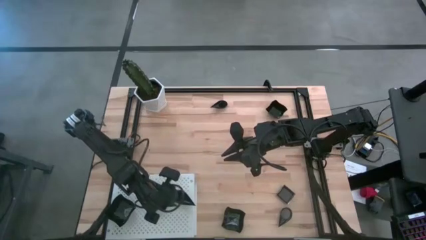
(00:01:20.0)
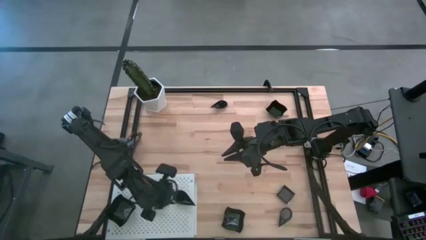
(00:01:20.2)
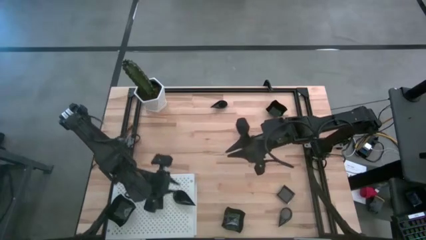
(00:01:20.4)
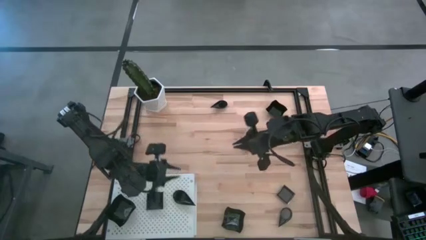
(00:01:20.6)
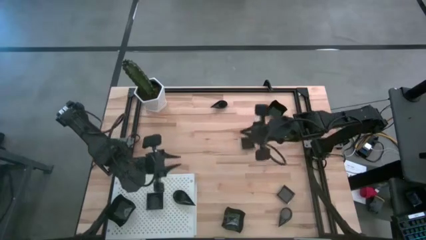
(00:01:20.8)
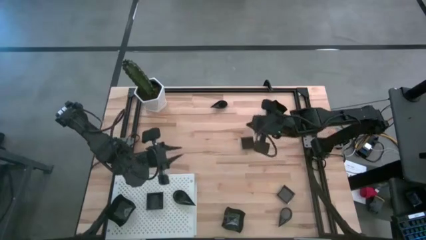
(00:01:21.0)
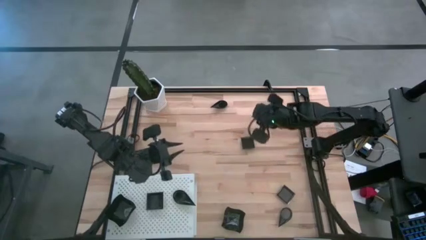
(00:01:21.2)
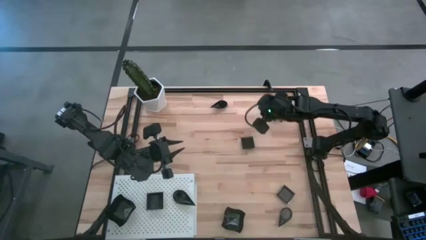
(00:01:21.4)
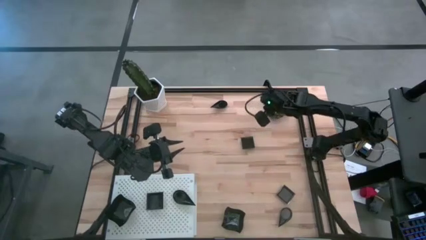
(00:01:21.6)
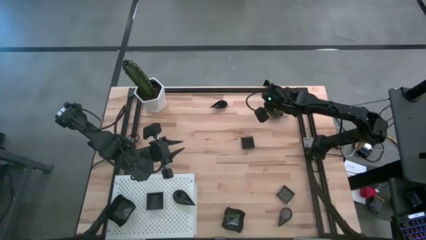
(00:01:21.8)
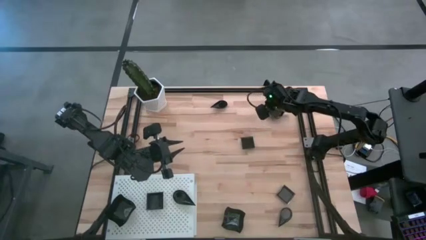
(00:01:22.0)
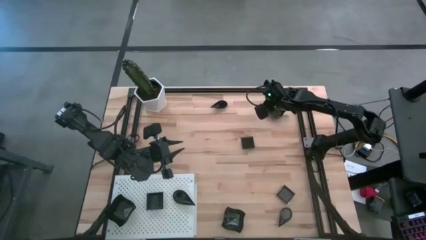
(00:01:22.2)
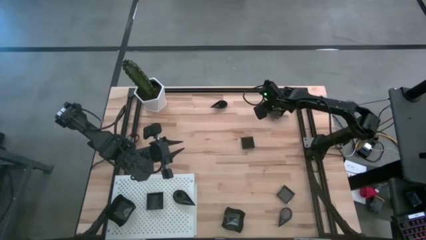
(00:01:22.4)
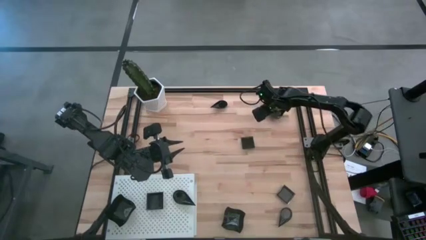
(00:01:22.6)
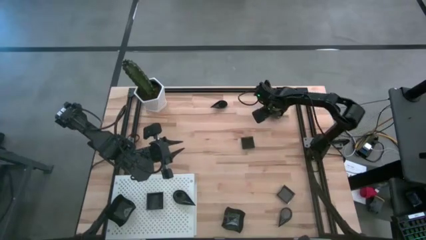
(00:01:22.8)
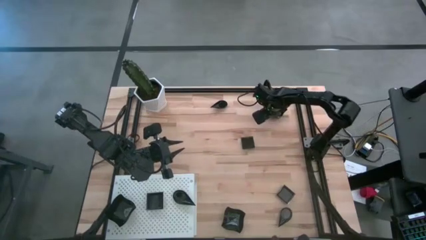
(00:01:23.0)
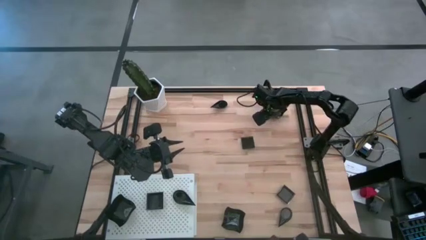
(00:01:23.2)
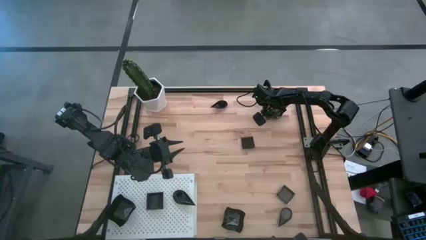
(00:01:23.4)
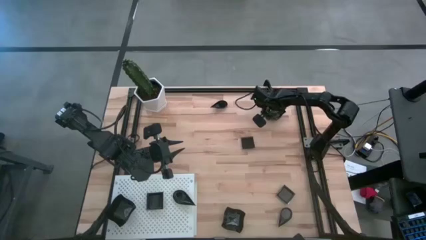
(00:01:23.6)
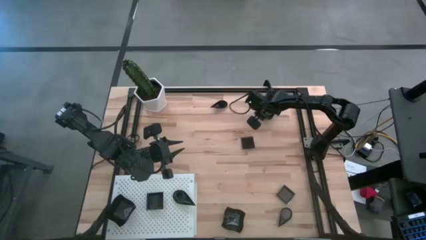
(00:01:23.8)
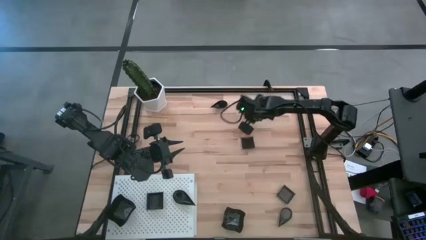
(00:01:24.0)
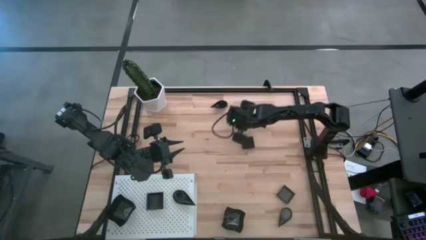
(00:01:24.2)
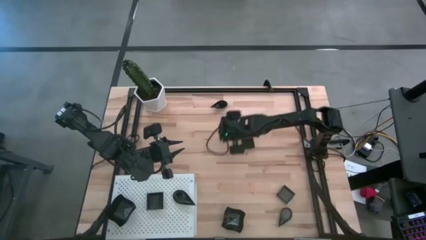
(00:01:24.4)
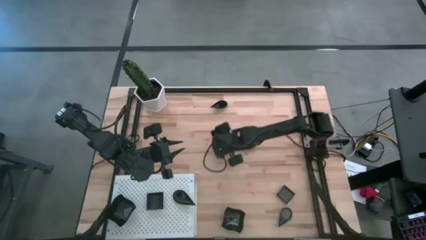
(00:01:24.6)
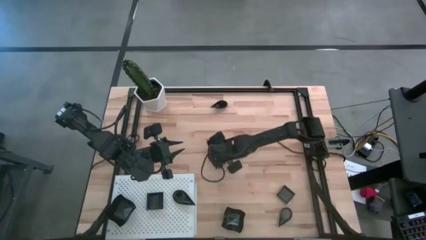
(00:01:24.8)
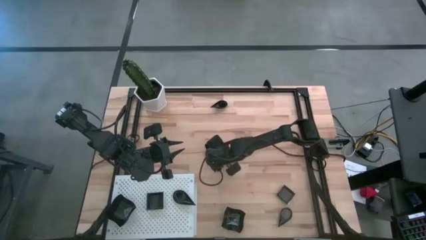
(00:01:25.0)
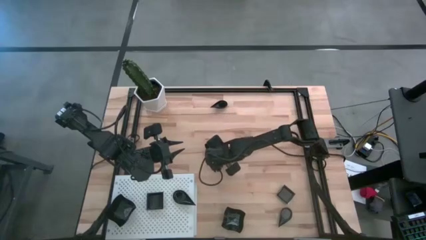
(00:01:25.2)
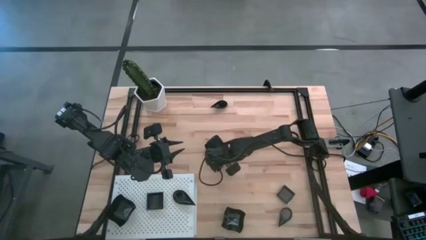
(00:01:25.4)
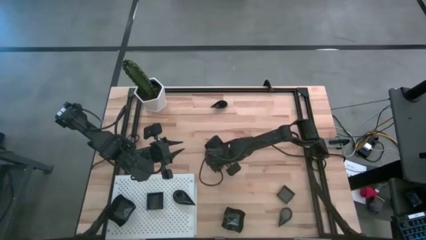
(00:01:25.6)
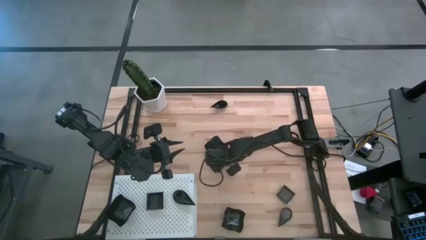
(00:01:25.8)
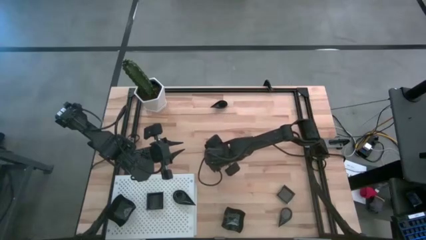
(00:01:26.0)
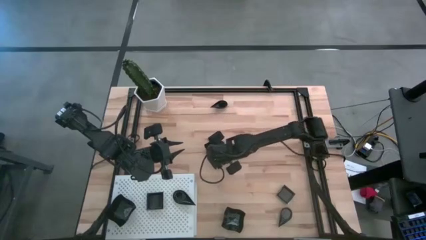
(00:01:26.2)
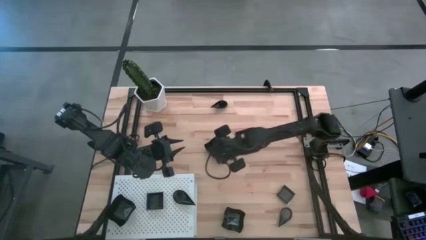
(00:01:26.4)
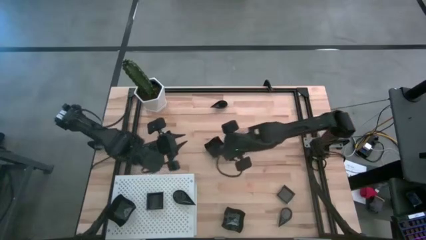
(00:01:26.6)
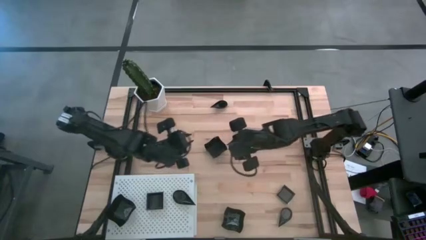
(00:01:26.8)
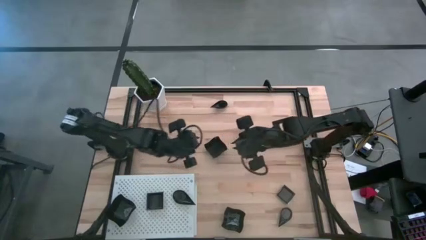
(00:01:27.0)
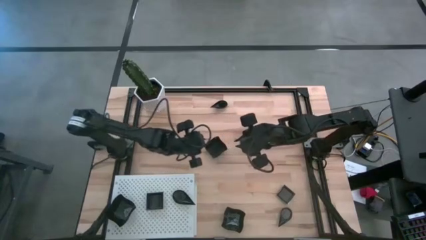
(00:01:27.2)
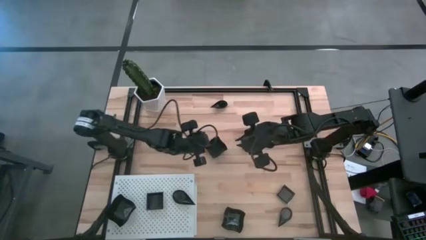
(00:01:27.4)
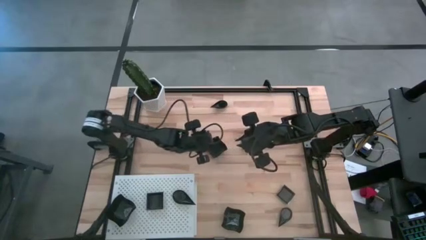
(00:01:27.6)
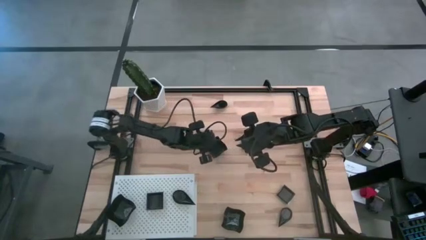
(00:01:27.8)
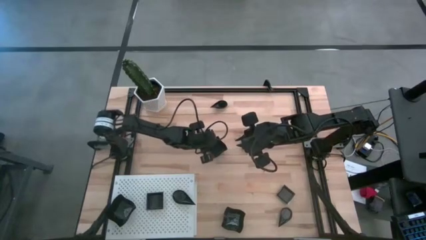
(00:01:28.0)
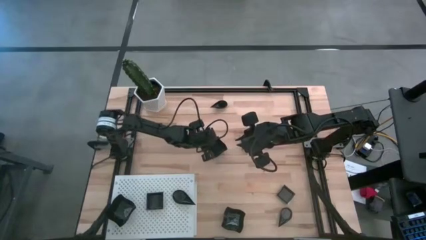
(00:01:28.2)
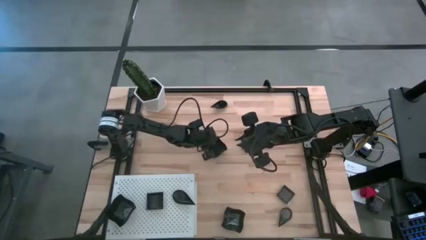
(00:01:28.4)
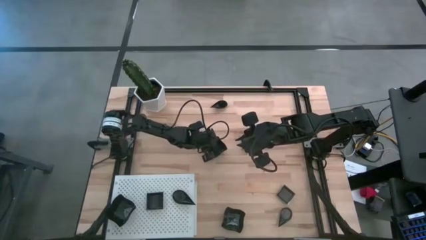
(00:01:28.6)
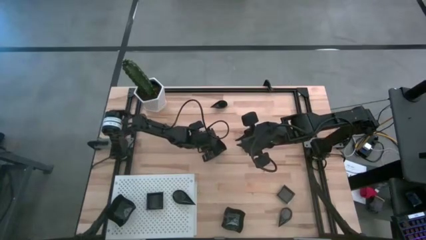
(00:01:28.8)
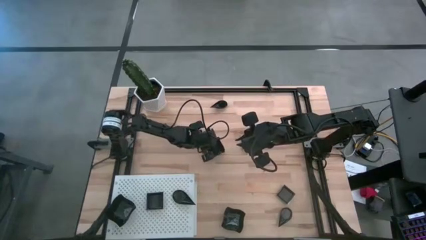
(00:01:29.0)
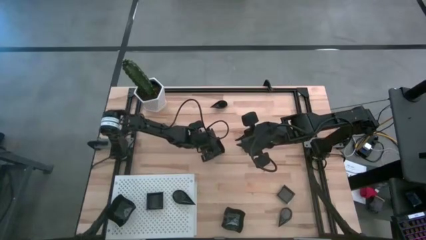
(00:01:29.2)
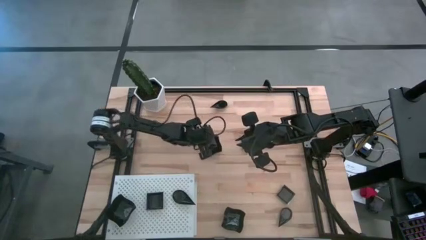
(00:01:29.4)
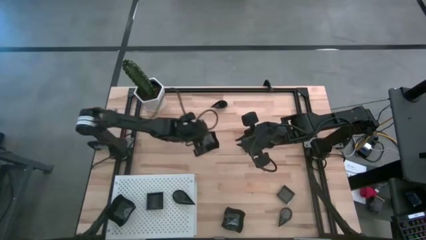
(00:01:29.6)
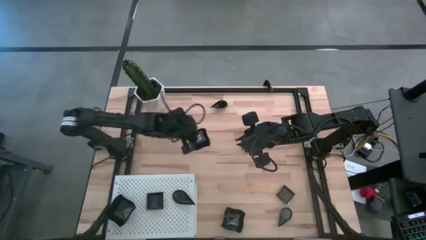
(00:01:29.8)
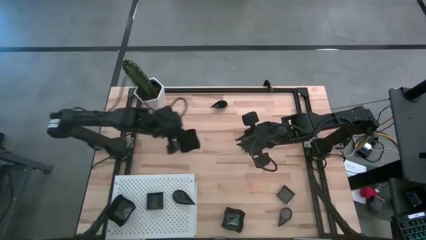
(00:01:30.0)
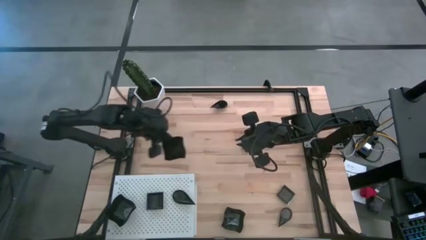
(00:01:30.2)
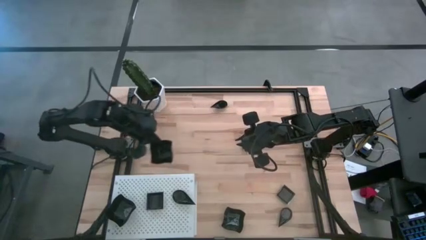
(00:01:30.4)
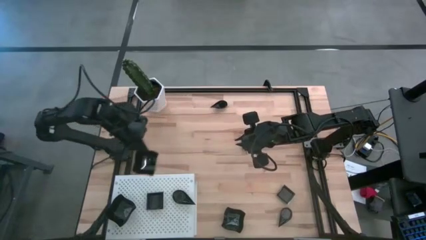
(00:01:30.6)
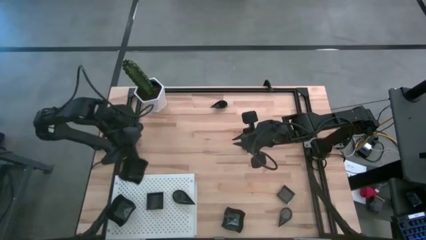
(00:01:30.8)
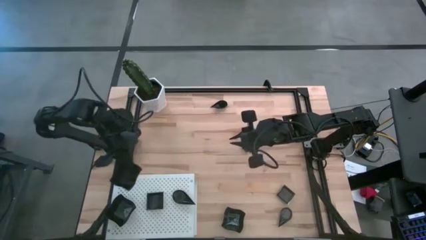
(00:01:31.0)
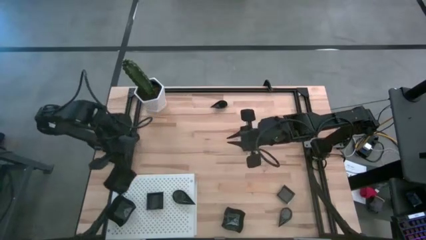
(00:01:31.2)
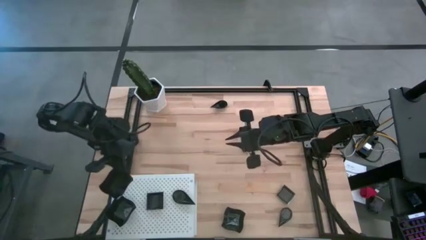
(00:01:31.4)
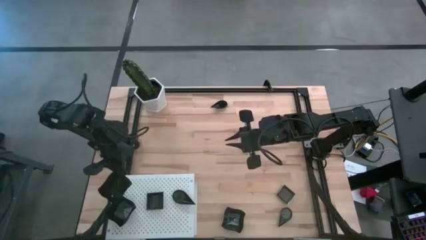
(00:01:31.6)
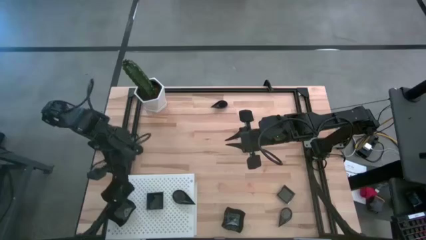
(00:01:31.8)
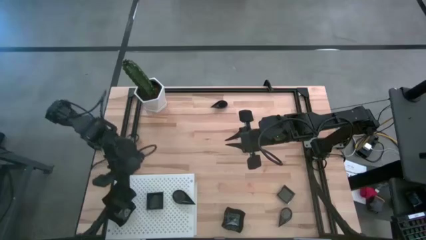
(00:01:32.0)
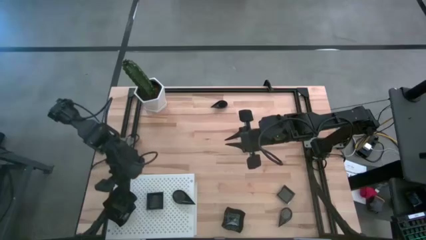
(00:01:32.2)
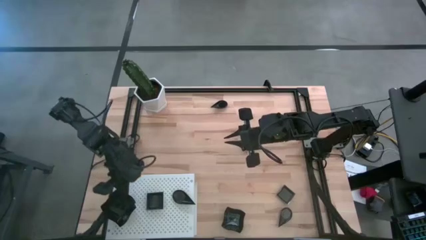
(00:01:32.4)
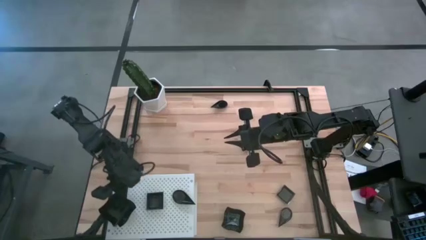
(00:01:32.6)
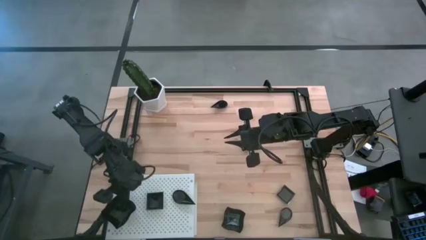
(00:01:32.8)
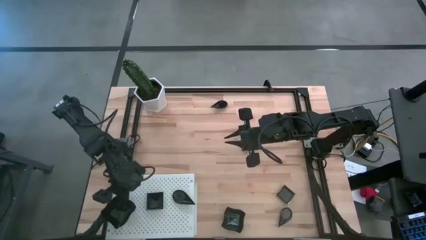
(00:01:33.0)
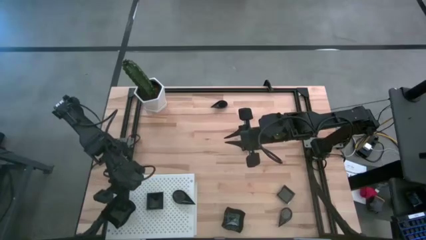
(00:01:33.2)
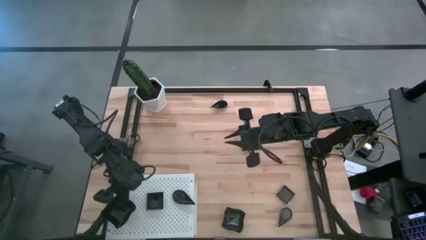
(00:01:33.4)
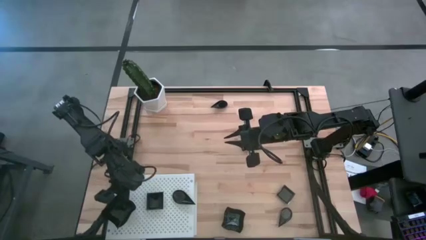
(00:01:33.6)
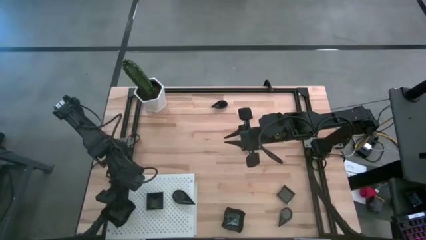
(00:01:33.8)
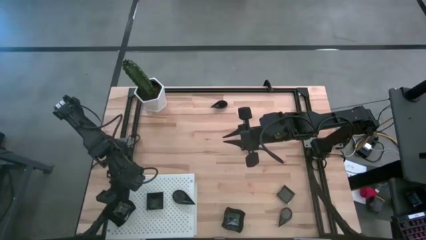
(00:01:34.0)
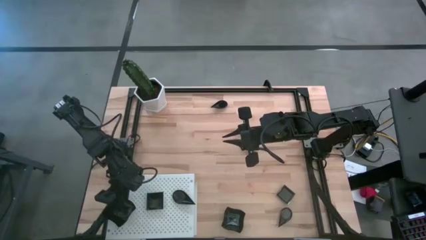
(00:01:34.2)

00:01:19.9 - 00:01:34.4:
Task: Pick & Place Mini shaped plates
Stack the distorted square plate on top of the other distorted square plate on the shelf
